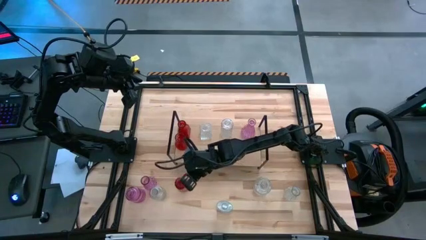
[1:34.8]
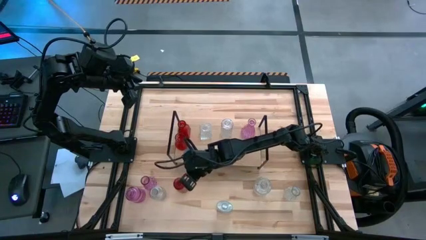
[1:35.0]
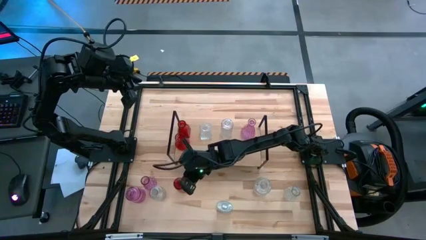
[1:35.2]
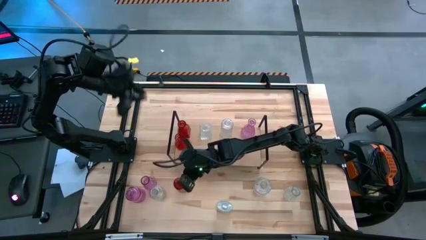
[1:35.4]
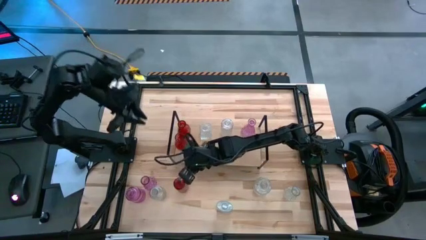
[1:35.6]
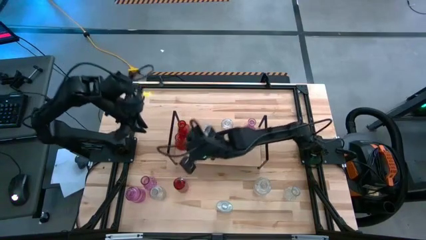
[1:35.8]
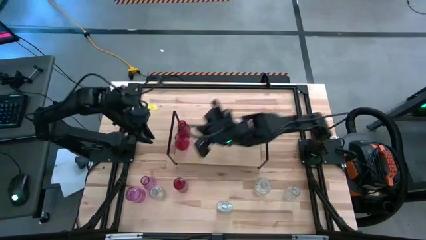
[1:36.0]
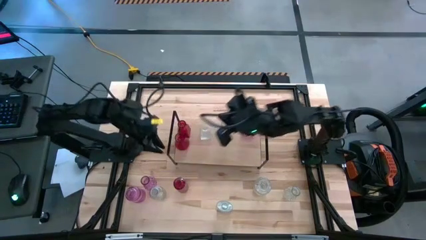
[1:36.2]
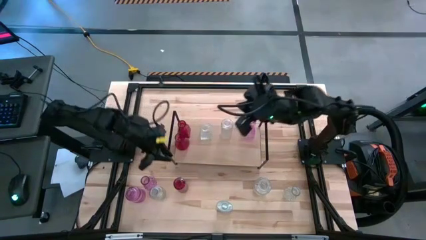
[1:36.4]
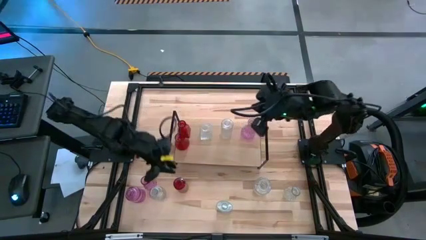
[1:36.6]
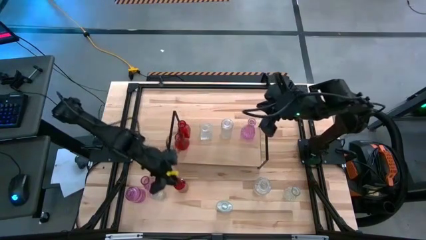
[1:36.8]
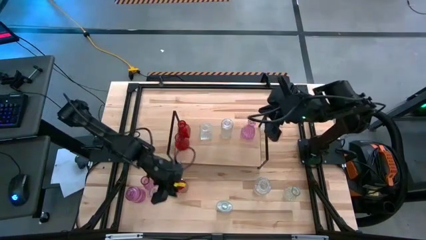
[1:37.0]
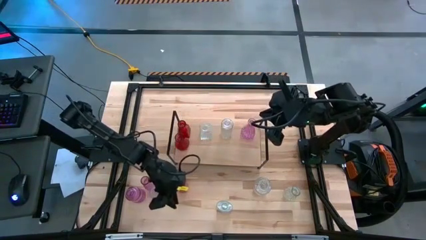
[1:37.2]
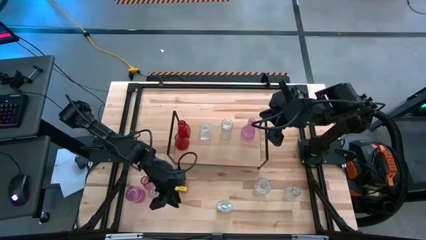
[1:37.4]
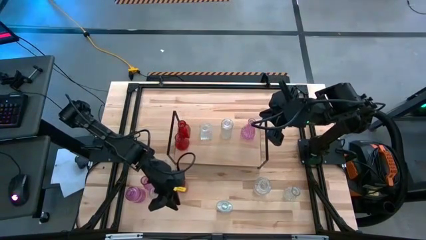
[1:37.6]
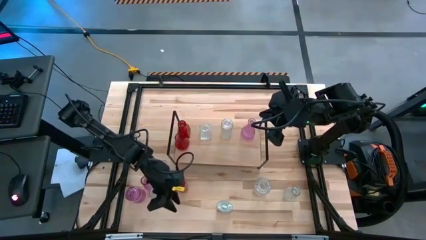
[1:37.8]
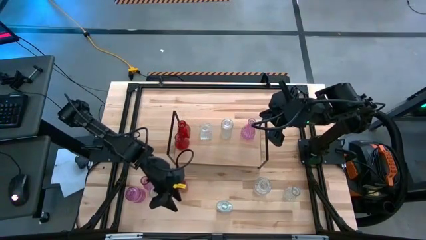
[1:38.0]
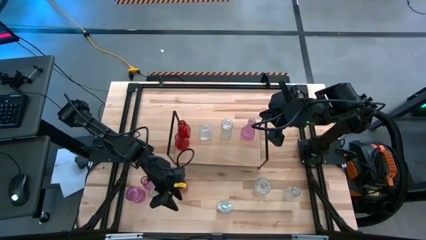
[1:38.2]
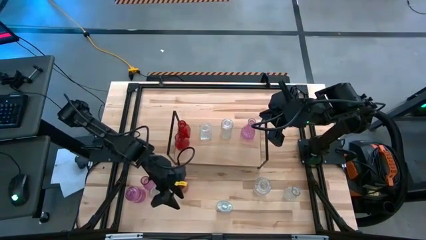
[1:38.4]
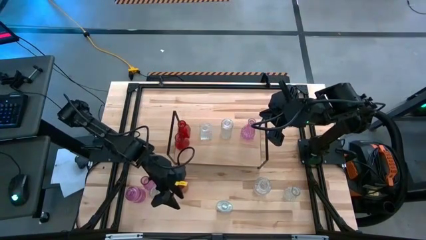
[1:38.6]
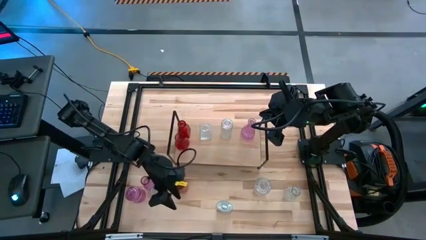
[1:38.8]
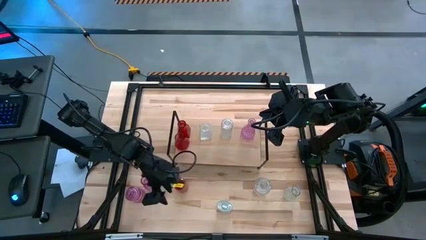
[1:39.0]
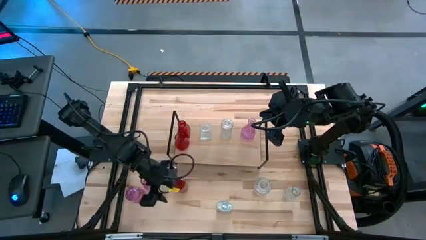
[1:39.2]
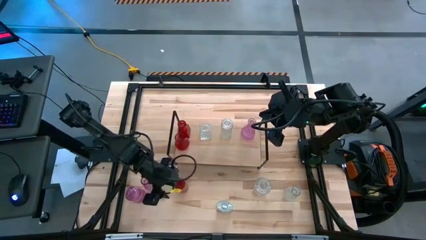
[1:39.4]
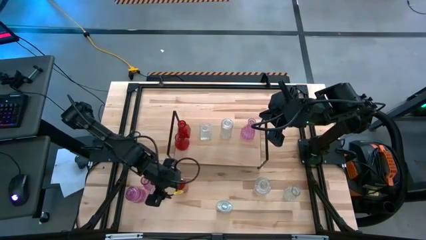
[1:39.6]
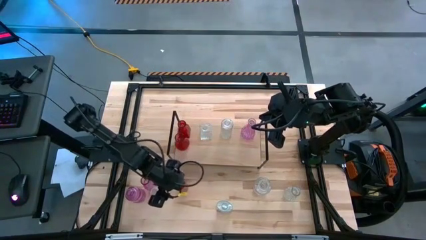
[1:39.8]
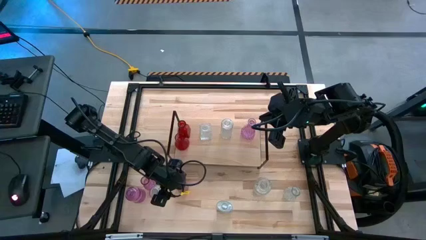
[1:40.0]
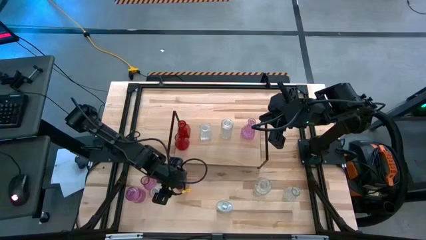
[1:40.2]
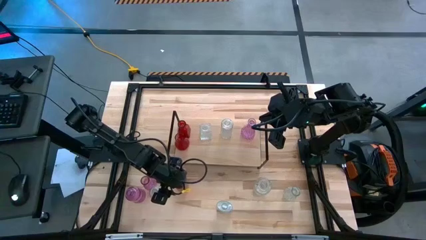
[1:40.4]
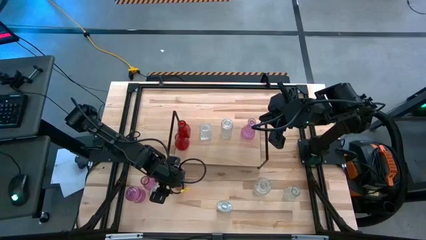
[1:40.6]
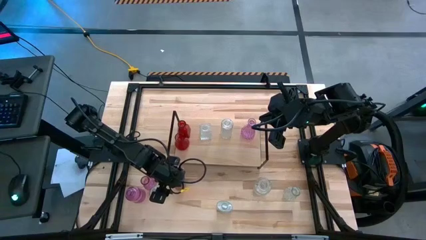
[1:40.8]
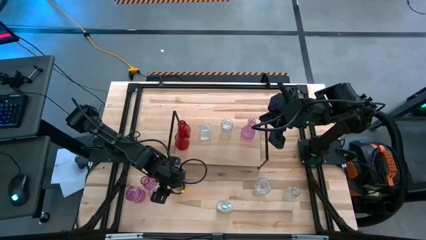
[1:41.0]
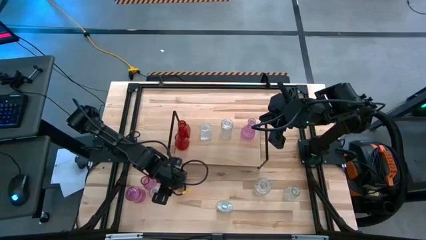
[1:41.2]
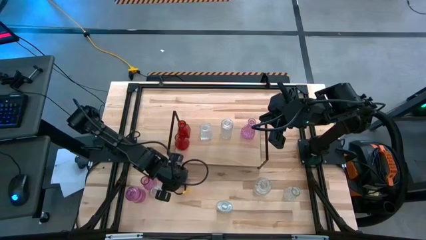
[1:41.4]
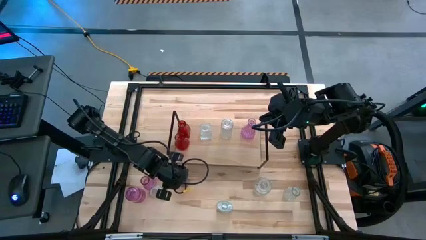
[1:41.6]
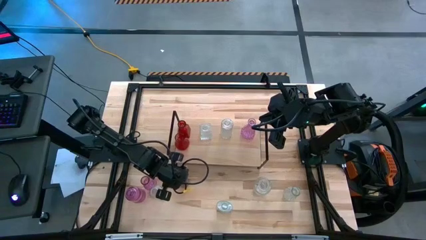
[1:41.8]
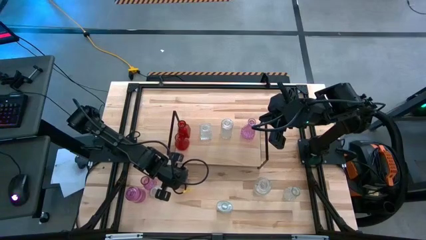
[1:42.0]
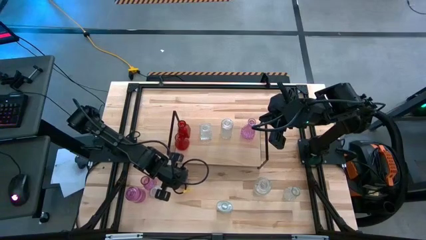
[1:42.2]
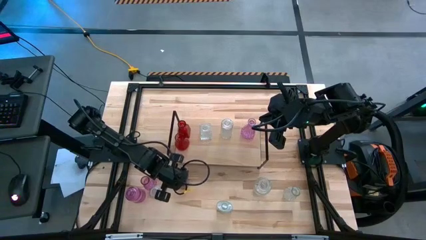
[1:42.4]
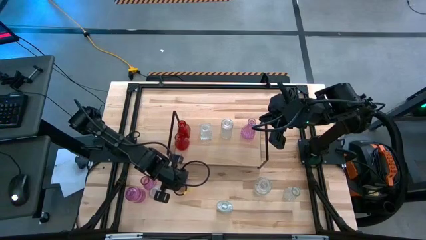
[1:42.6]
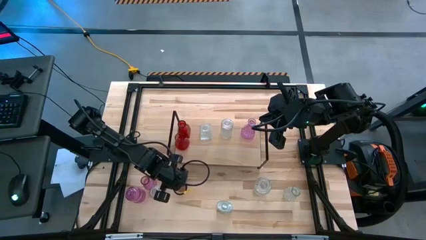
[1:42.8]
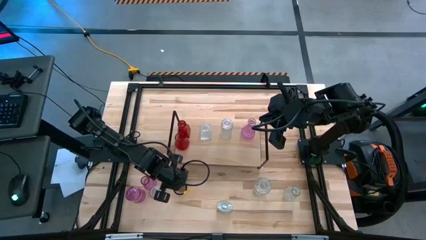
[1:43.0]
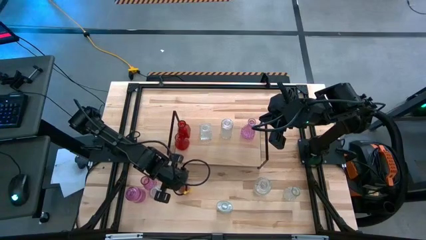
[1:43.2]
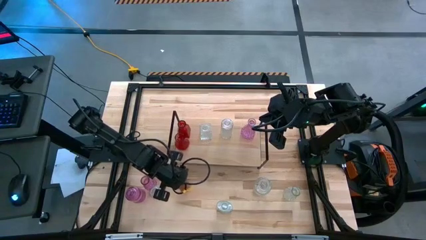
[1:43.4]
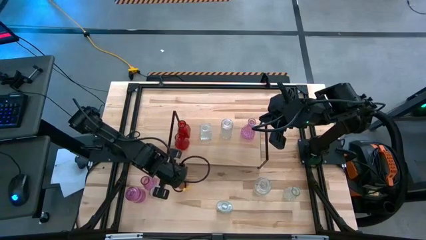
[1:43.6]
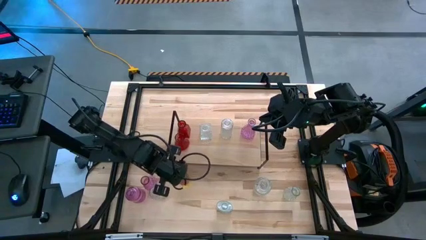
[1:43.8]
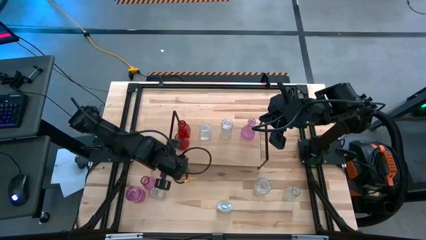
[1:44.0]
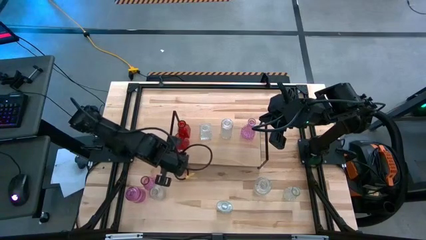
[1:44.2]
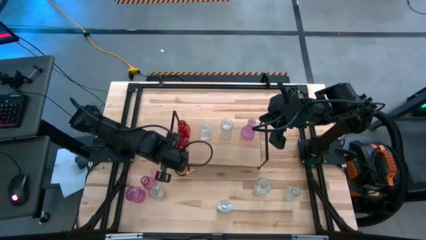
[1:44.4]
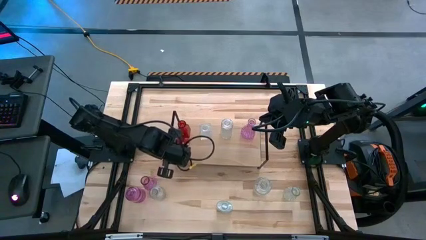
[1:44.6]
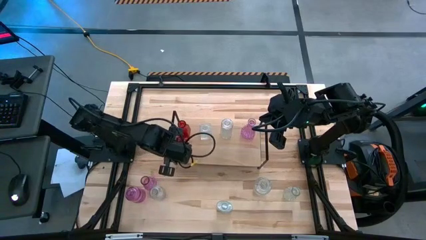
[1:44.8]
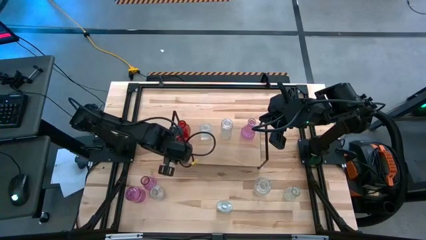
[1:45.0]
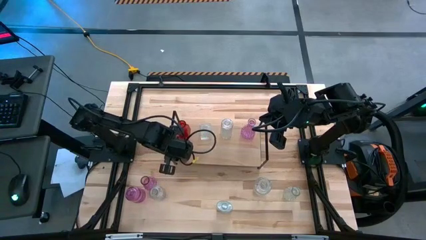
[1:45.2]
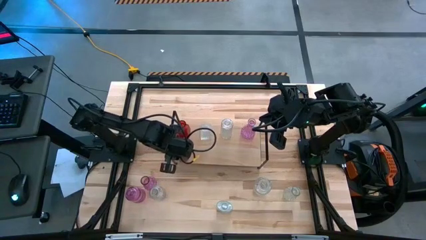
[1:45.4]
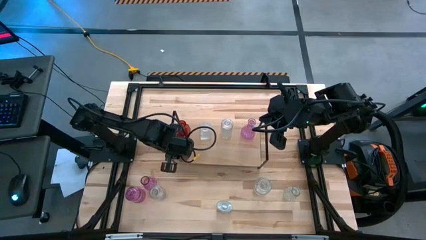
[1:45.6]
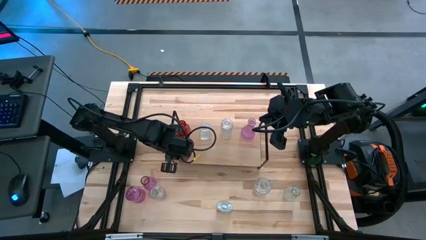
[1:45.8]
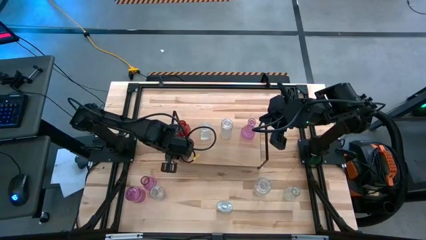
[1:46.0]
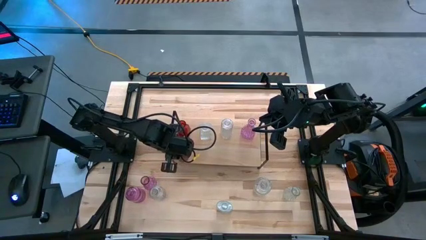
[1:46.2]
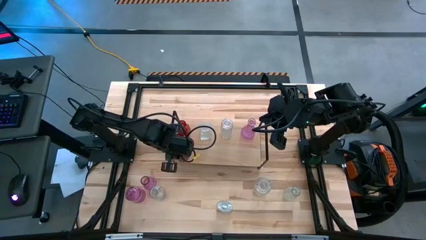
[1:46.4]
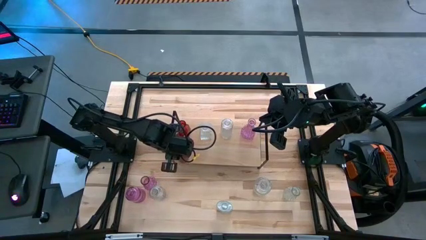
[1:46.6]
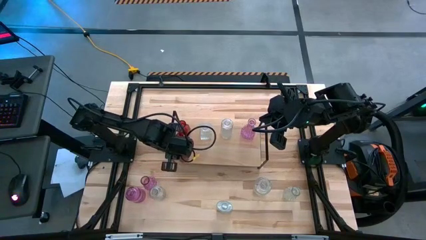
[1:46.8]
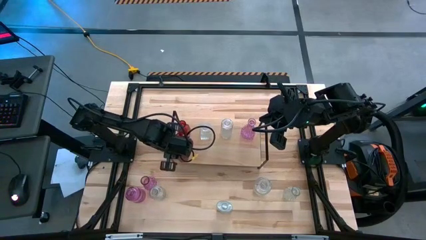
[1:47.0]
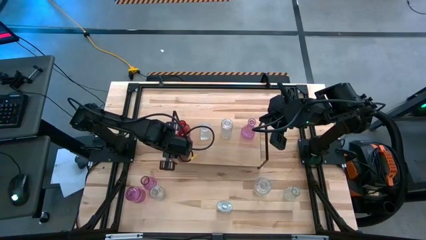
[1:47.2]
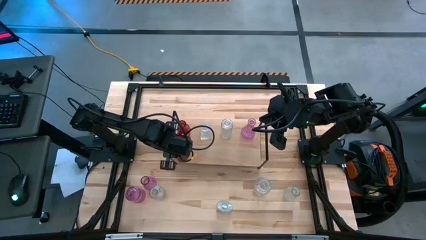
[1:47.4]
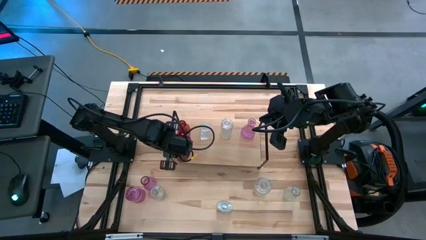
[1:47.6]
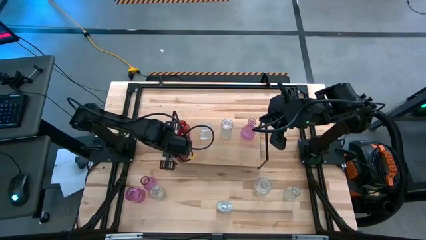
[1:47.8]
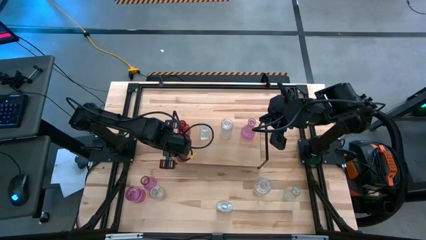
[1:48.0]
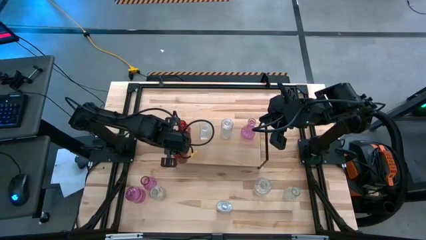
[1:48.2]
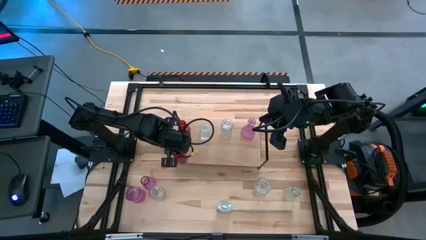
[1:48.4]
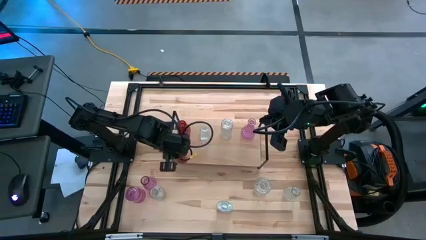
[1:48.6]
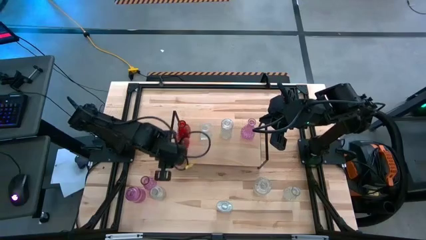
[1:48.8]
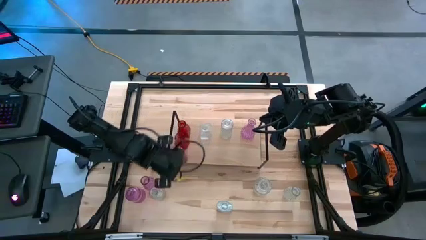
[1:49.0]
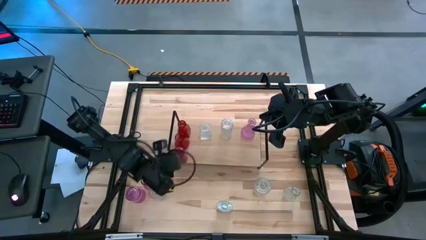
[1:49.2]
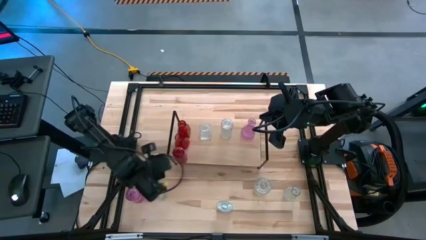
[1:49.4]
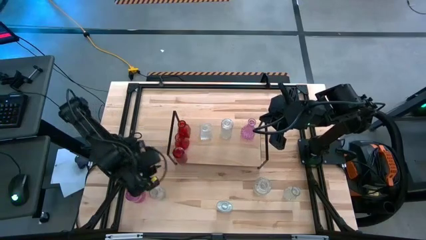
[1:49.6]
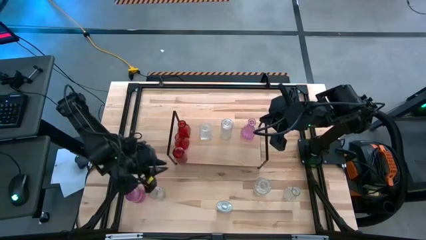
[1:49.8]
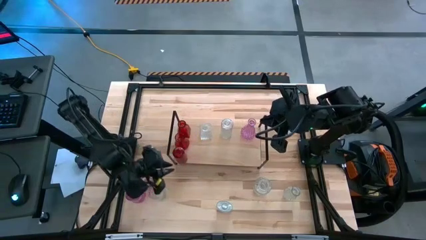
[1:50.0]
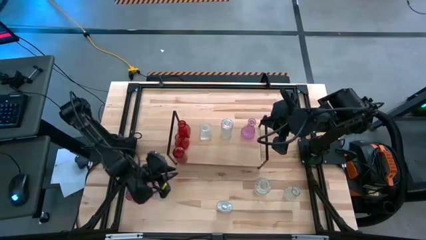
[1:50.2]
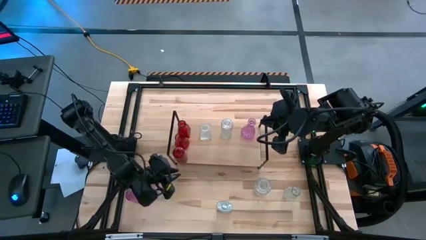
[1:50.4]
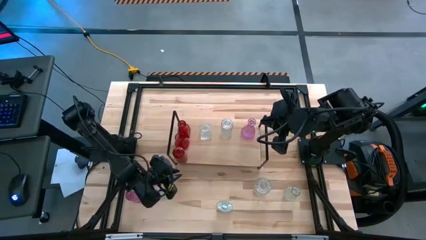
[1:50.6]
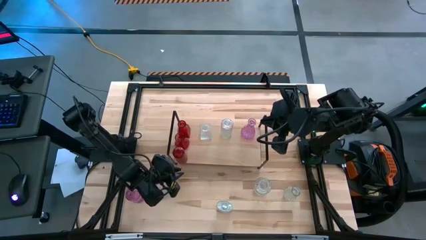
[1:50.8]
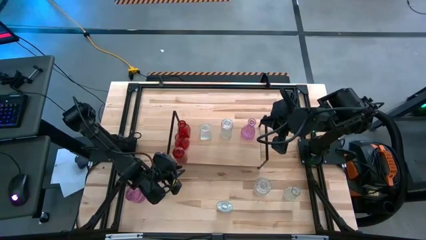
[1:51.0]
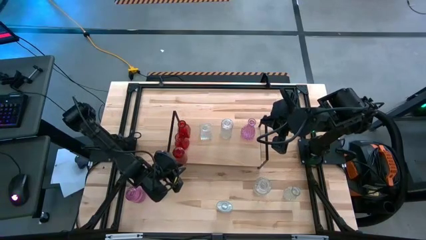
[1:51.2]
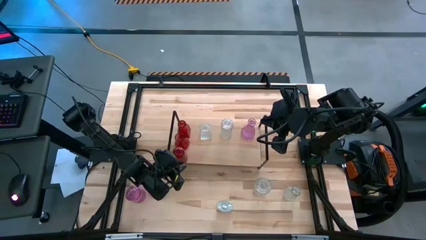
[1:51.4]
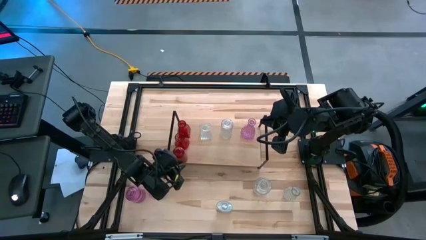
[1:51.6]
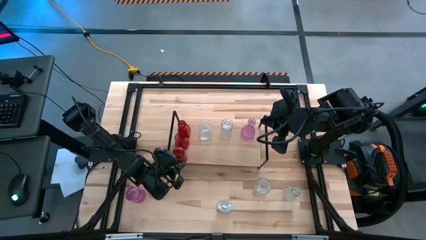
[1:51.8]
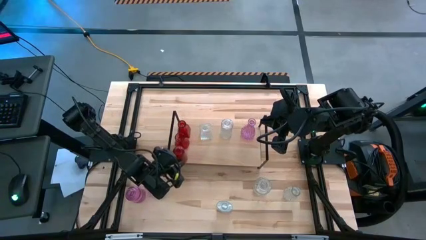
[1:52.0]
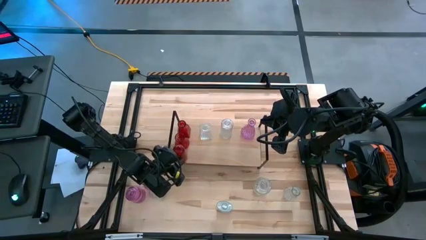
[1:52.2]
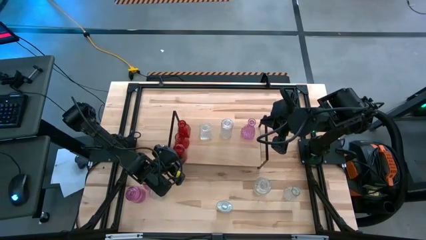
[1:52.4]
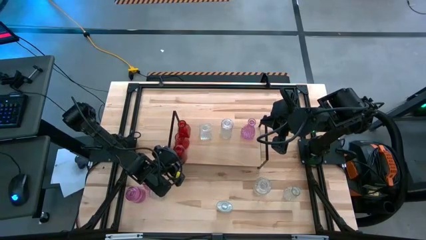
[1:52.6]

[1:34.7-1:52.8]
Task: sort vases onto shelf
Put the red vase aligned with the other red vase on the shelf
